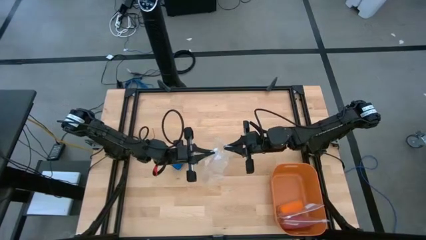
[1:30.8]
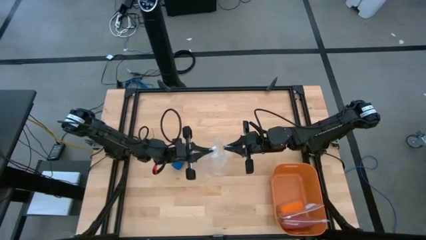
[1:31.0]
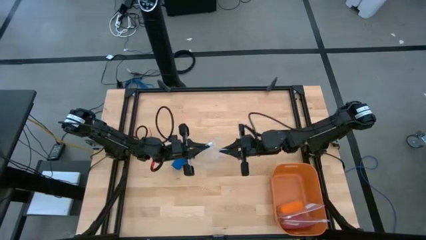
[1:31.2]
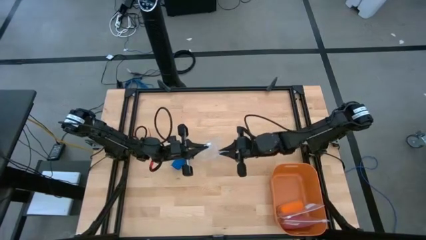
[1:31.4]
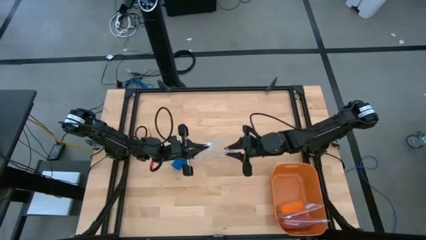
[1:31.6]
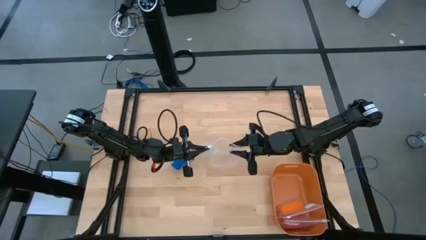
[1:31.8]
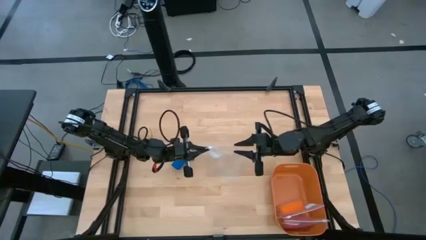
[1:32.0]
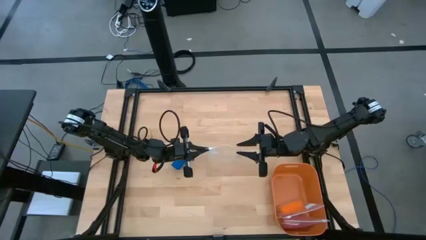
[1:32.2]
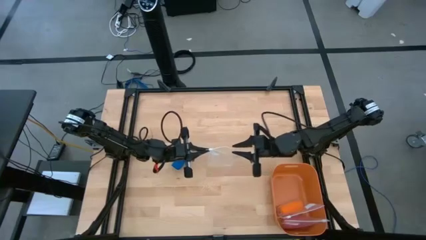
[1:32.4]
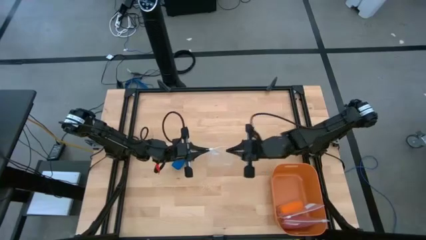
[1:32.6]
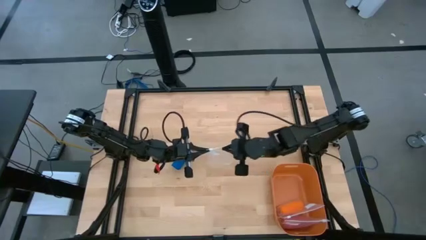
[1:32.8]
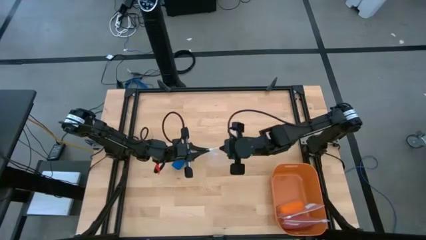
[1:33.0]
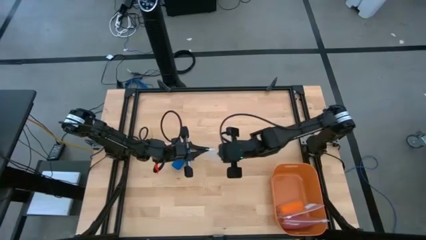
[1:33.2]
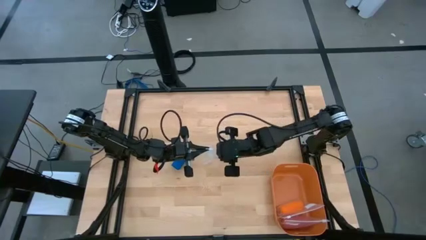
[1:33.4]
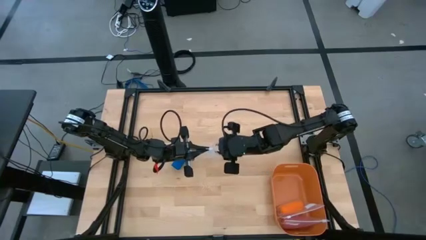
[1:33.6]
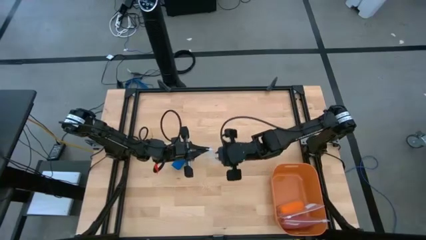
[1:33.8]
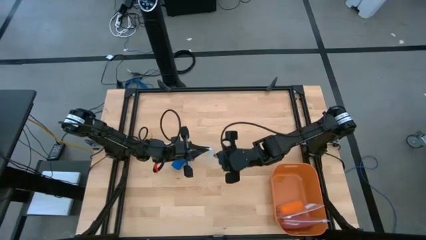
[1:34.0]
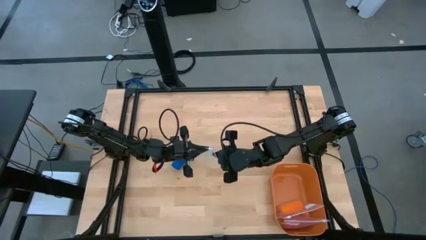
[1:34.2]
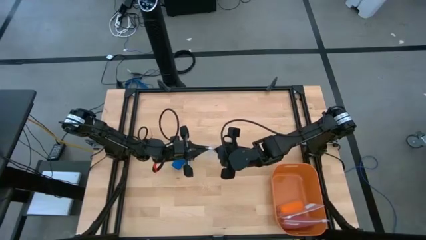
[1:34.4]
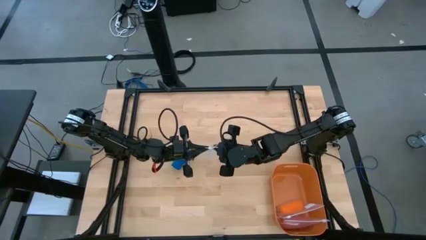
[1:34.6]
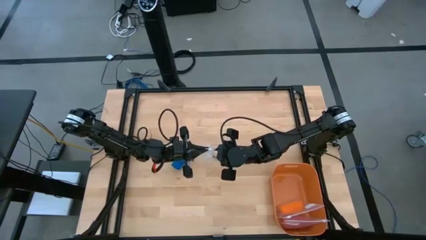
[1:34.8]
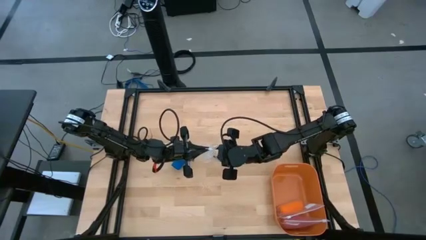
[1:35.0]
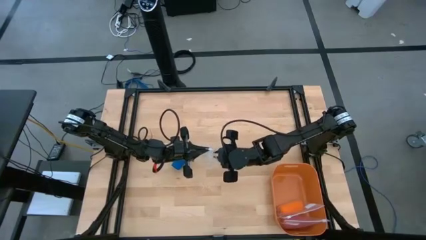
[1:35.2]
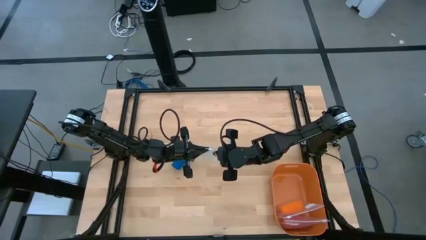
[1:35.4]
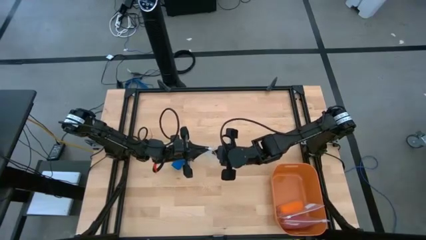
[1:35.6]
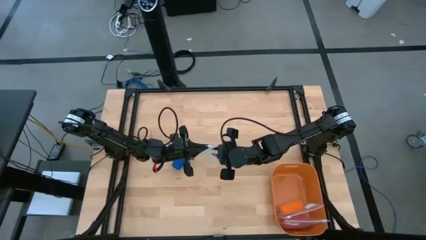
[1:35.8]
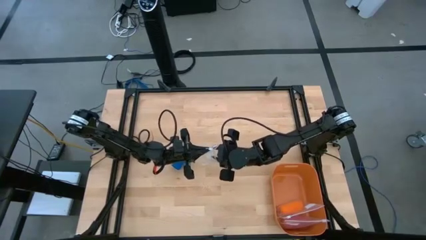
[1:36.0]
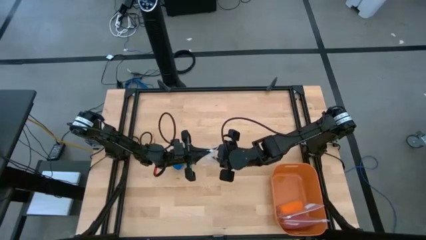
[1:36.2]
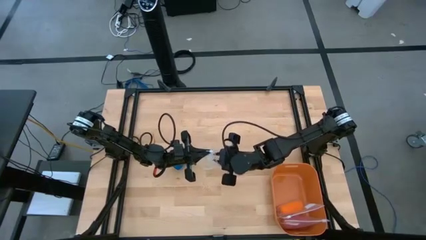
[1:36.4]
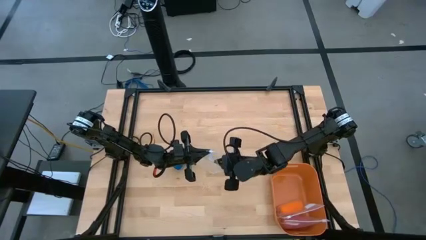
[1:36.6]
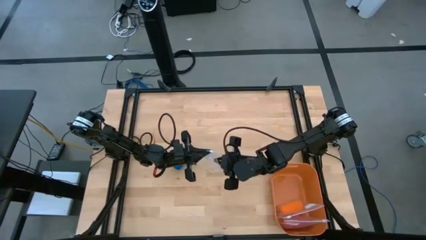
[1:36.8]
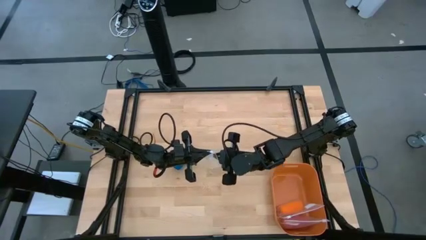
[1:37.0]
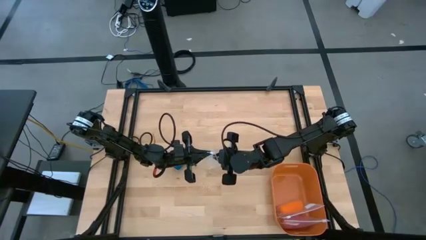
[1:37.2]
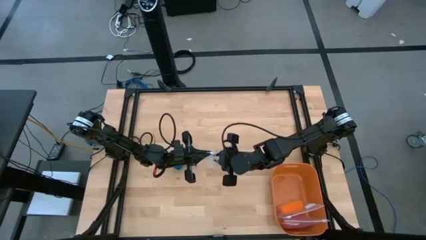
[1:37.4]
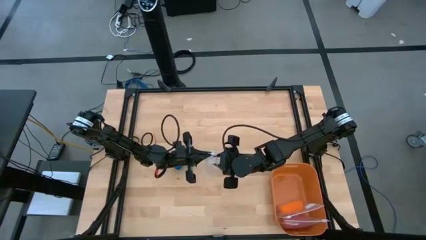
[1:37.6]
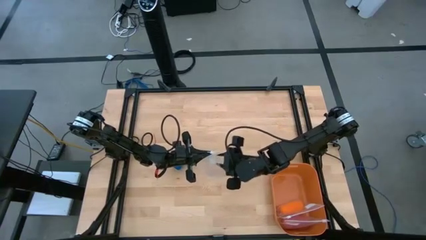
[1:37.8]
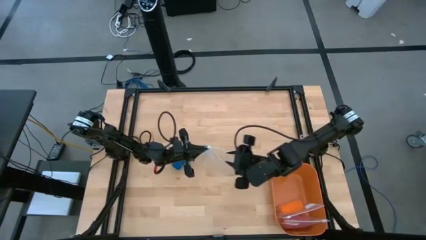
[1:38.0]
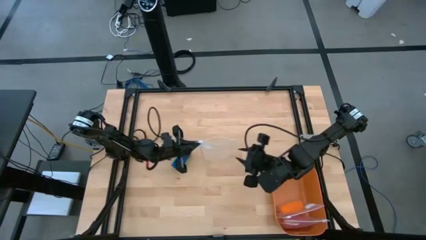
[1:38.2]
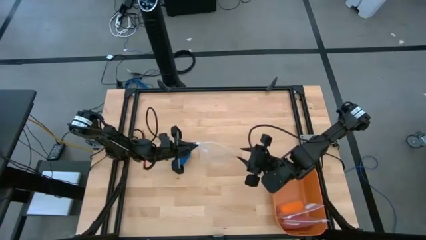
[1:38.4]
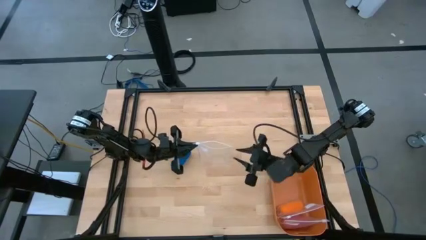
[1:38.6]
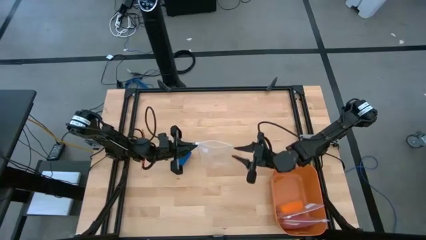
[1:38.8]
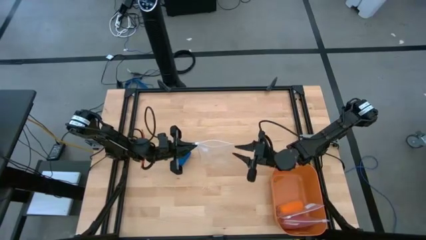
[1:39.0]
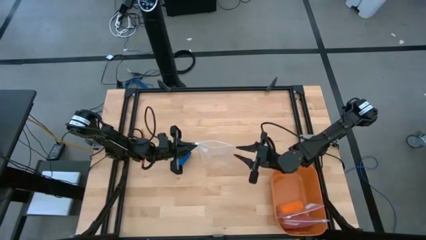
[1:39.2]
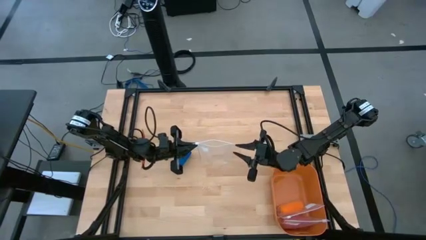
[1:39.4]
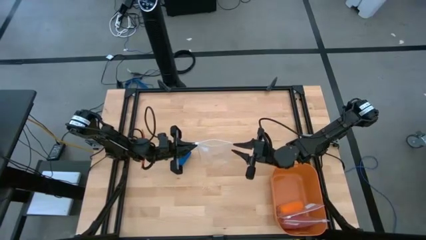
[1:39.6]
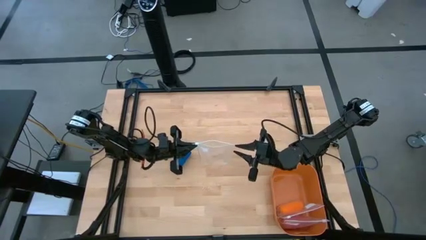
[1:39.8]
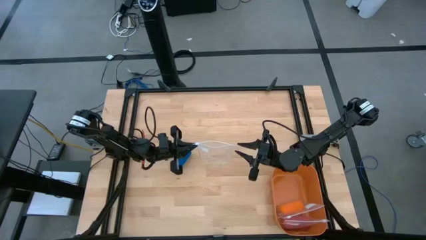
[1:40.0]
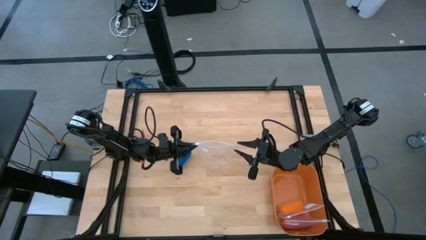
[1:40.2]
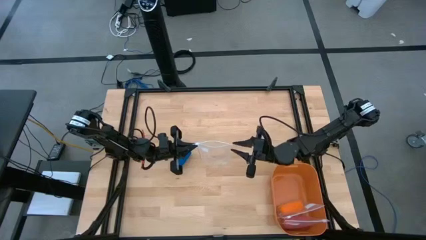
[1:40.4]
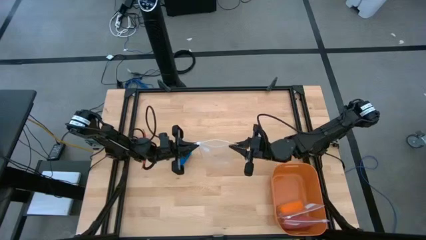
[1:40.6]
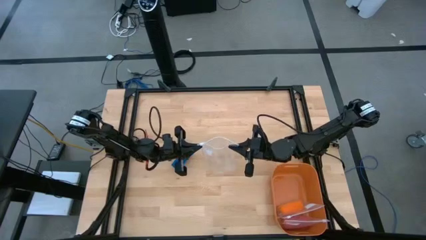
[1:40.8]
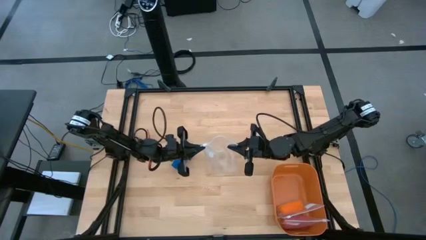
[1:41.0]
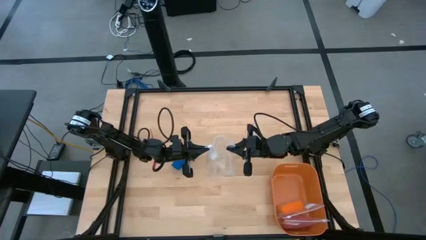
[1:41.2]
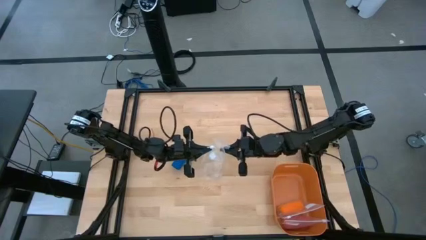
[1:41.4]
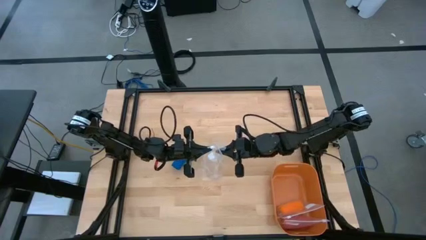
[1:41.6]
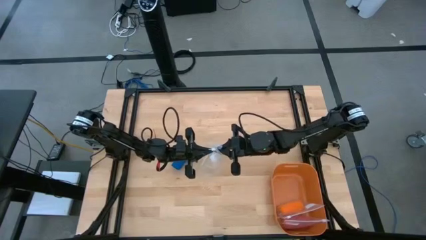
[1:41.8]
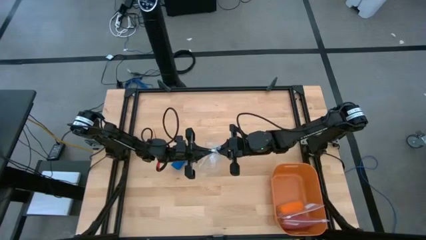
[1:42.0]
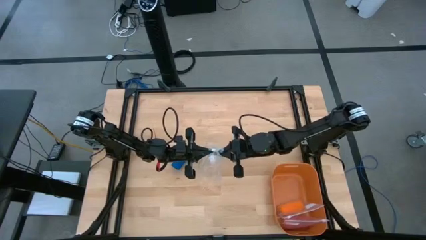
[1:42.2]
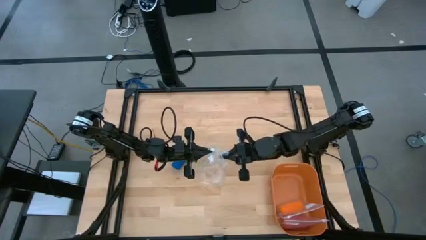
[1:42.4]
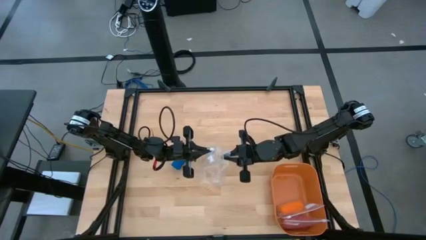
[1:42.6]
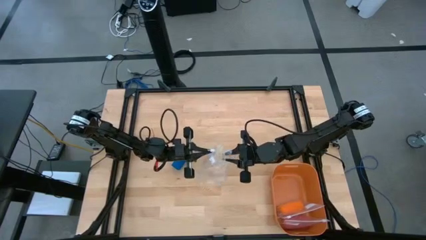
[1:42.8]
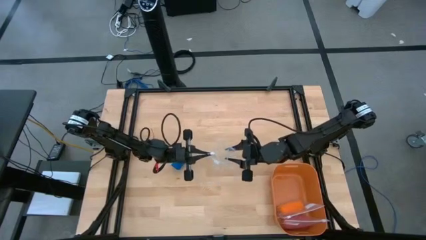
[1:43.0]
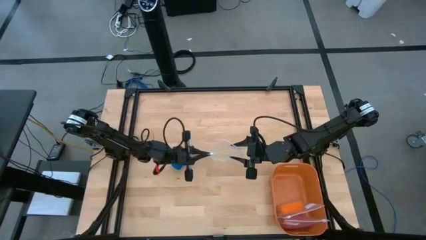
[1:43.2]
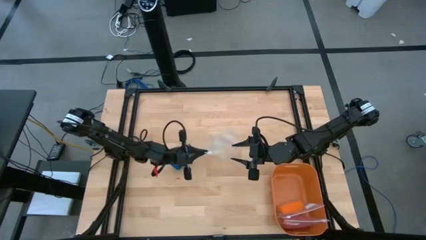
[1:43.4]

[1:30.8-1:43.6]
Task: Roll bandage
Open the transparent zip lock bag

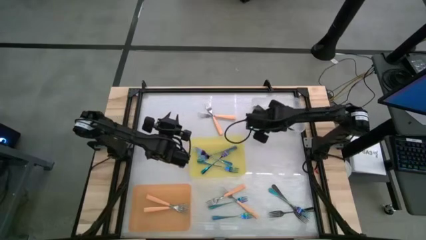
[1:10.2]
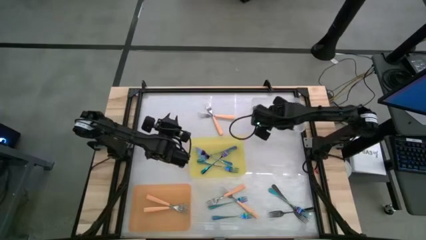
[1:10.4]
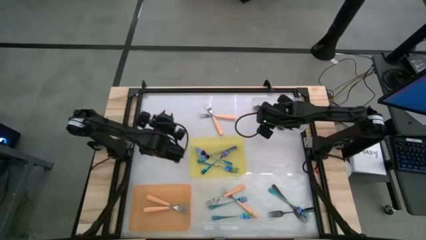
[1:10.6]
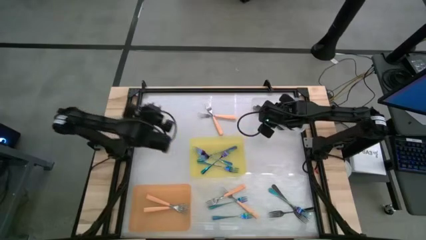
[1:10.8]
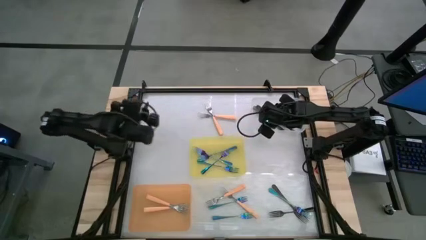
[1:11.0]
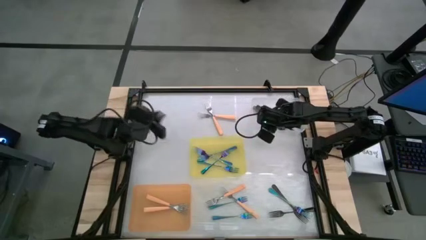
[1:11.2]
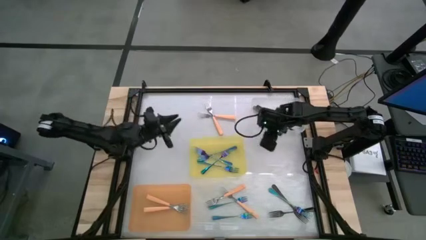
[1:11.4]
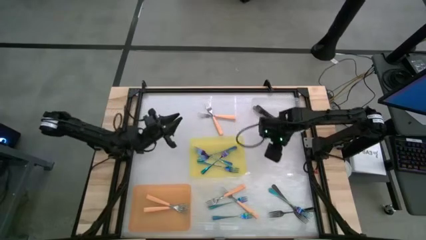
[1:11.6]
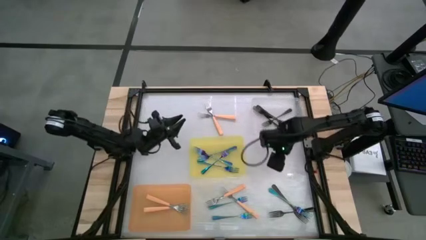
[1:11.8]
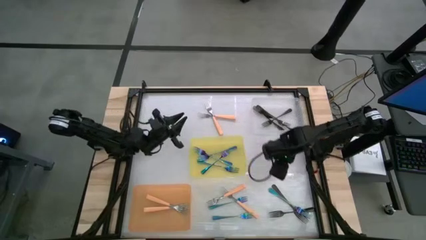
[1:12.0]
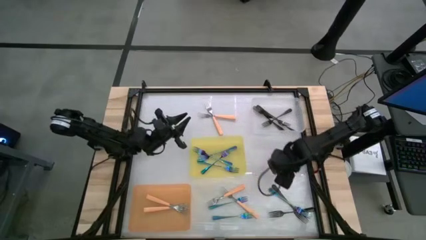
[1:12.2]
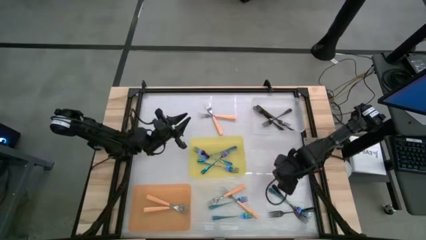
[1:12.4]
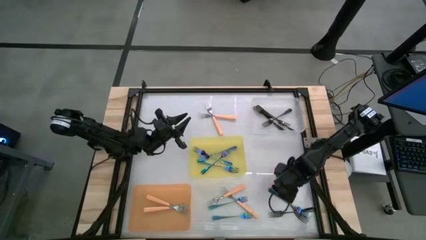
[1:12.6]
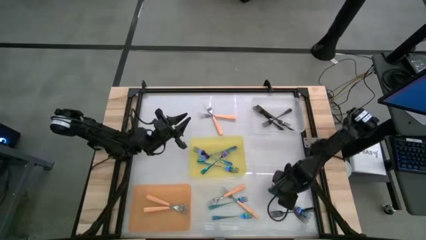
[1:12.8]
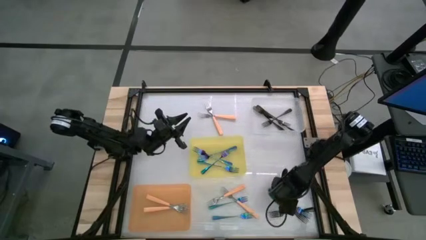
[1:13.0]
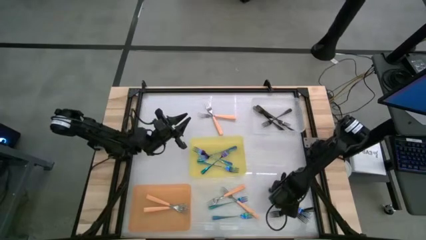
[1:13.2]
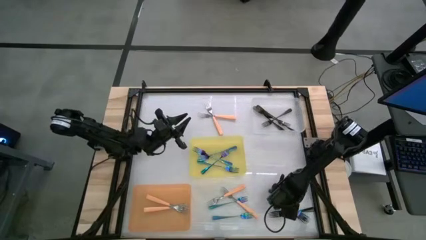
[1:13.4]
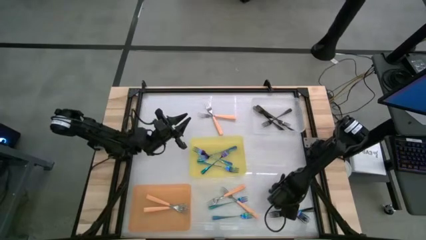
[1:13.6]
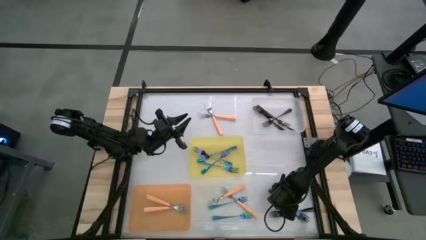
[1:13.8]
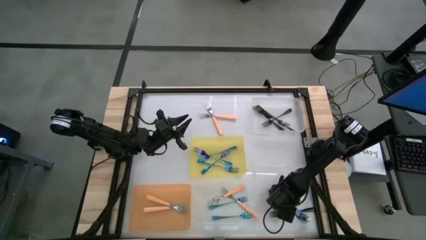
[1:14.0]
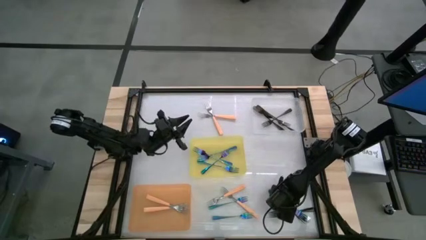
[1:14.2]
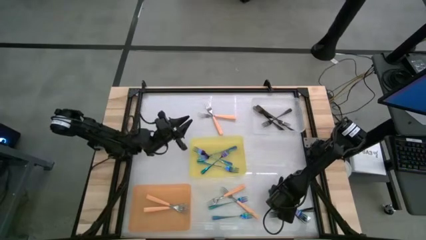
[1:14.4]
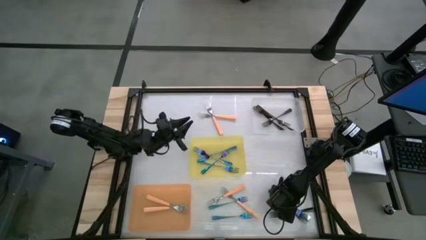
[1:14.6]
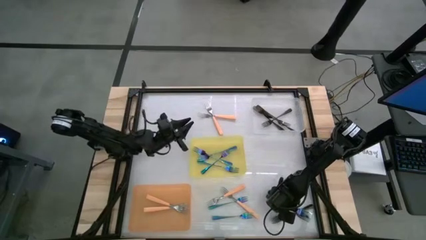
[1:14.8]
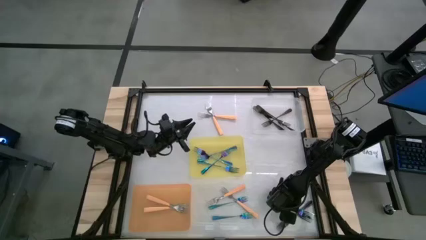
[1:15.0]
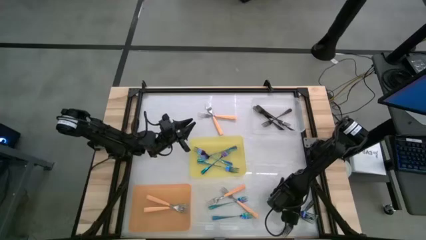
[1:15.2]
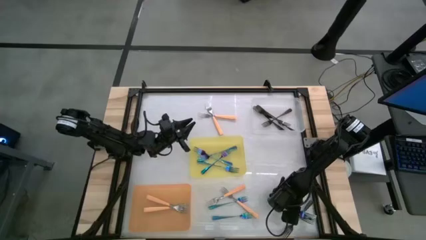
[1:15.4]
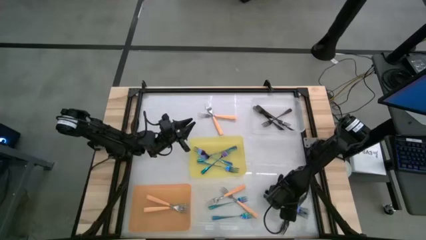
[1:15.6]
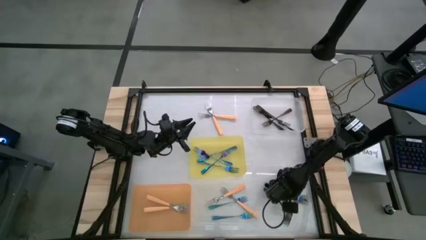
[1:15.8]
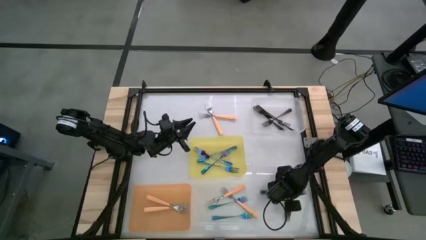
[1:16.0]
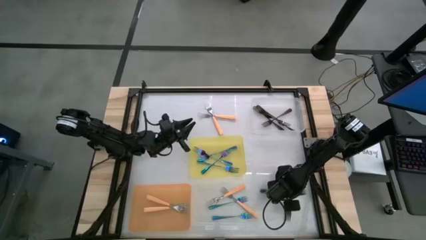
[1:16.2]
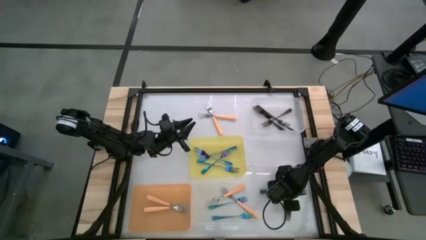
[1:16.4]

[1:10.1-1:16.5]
Task: Sort silverware by color (type)
Put the blue fork into the yellow bin
